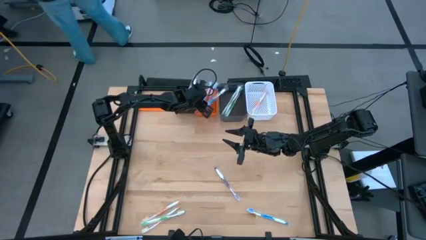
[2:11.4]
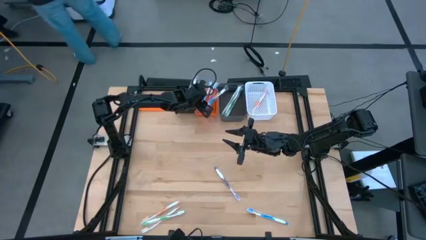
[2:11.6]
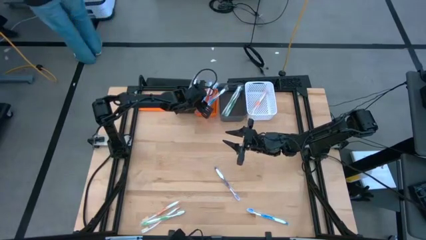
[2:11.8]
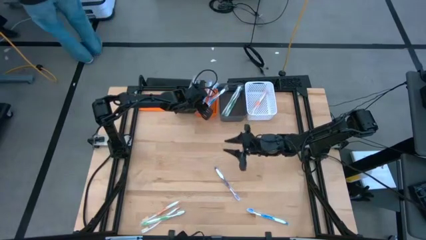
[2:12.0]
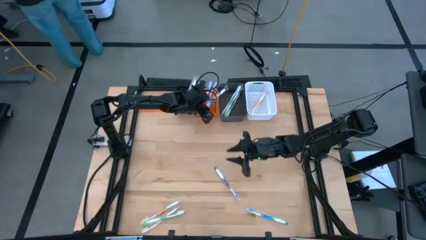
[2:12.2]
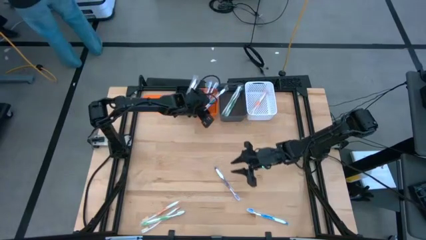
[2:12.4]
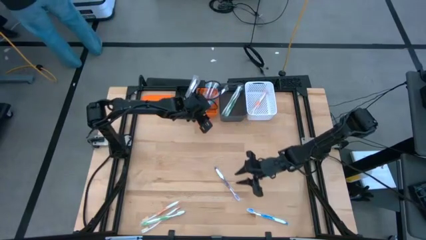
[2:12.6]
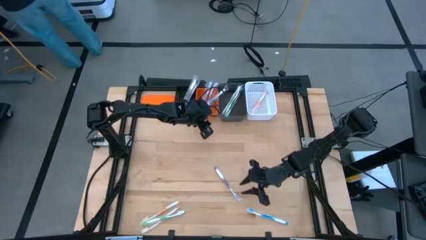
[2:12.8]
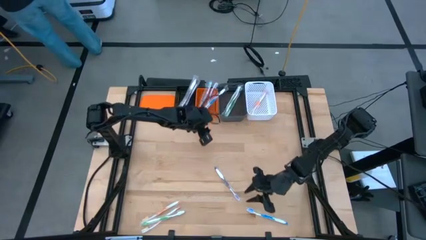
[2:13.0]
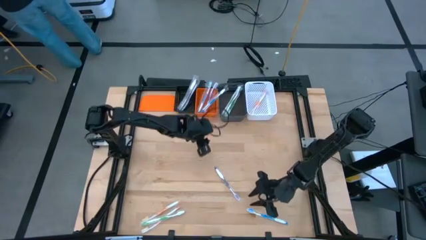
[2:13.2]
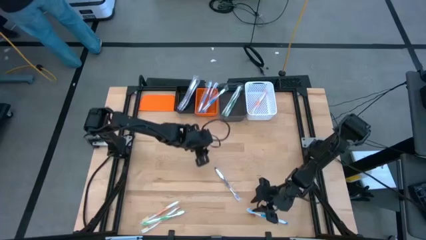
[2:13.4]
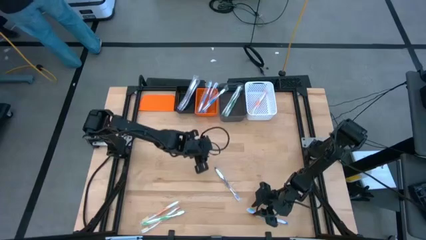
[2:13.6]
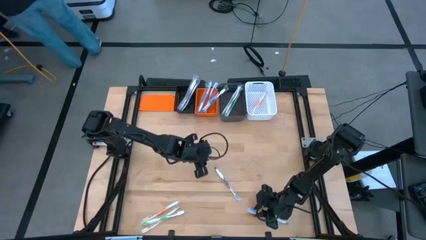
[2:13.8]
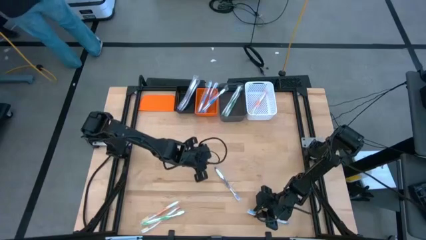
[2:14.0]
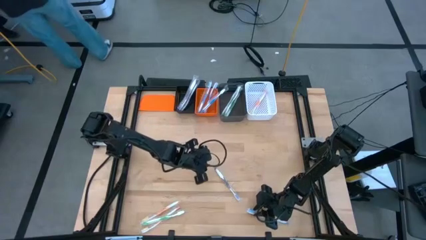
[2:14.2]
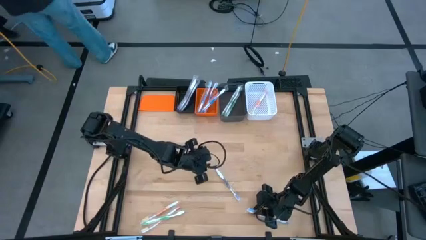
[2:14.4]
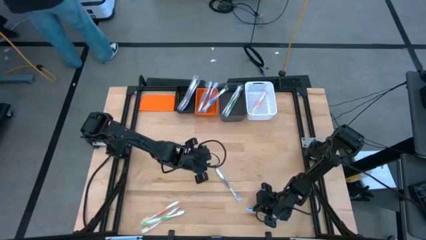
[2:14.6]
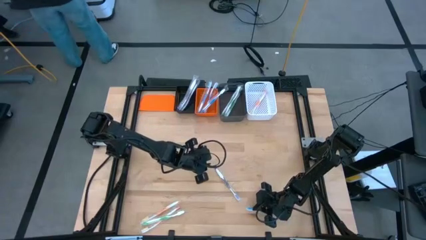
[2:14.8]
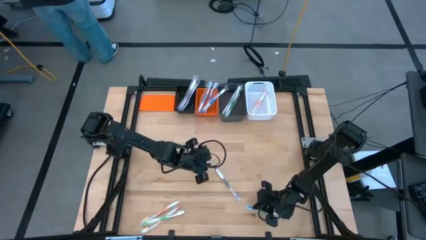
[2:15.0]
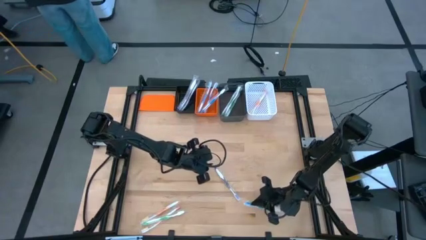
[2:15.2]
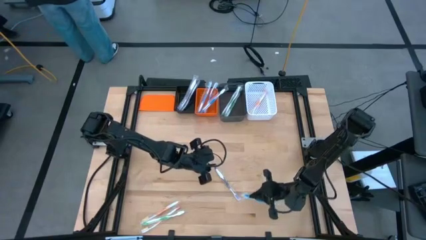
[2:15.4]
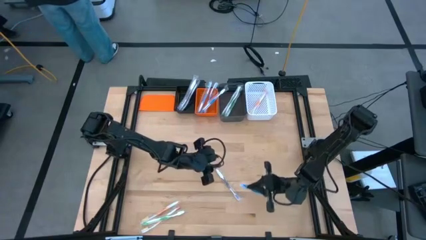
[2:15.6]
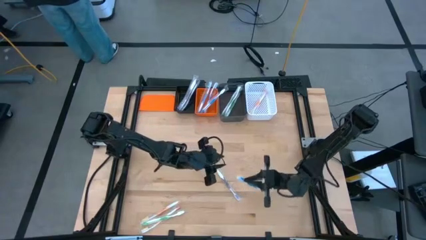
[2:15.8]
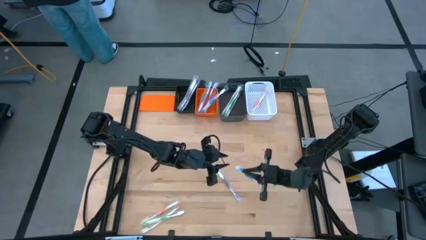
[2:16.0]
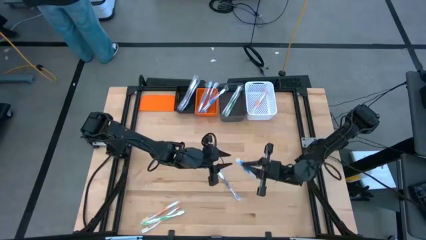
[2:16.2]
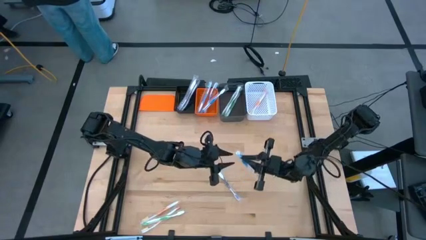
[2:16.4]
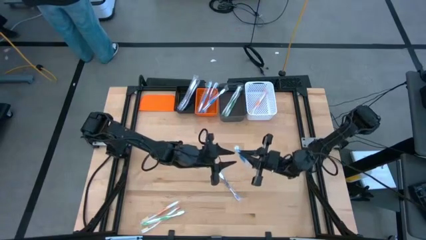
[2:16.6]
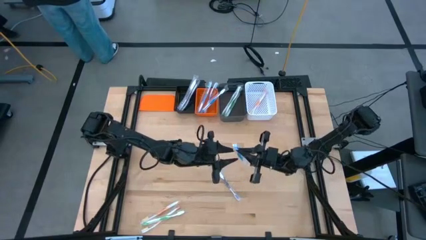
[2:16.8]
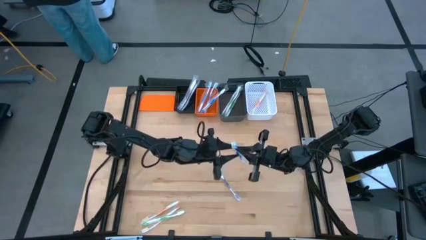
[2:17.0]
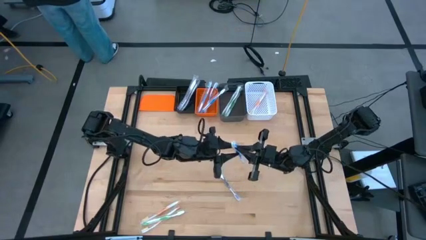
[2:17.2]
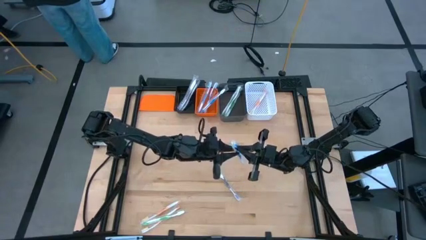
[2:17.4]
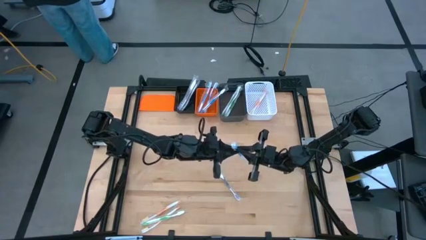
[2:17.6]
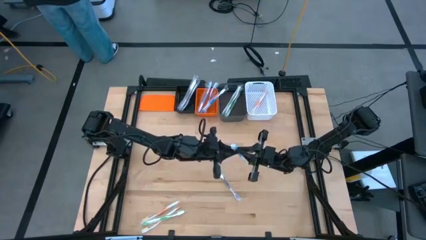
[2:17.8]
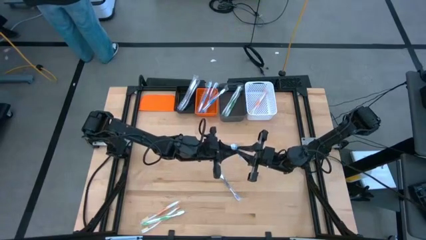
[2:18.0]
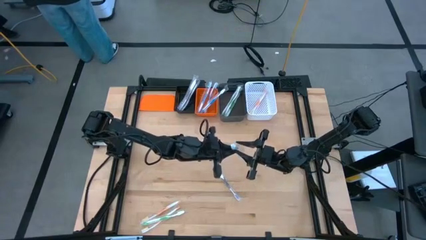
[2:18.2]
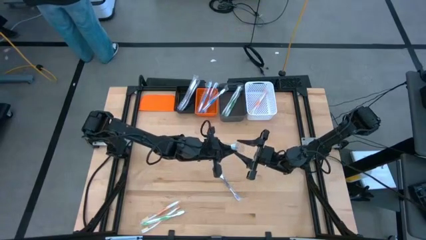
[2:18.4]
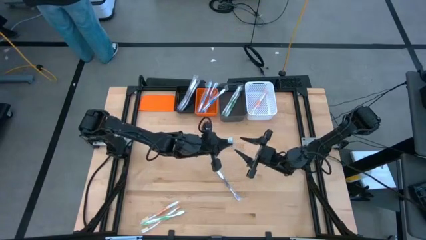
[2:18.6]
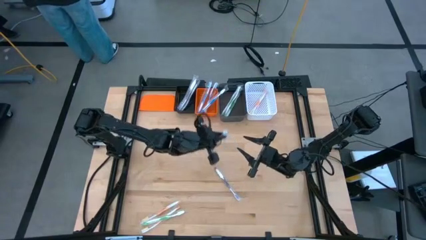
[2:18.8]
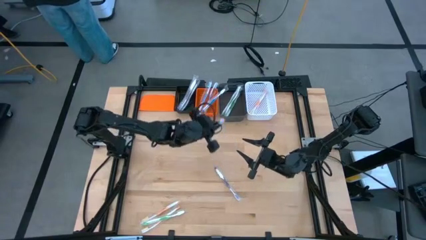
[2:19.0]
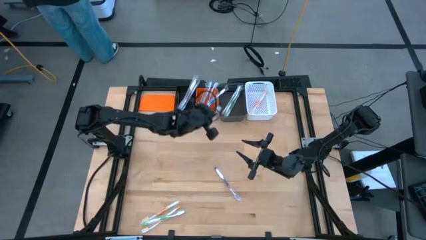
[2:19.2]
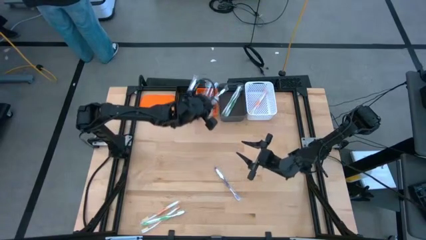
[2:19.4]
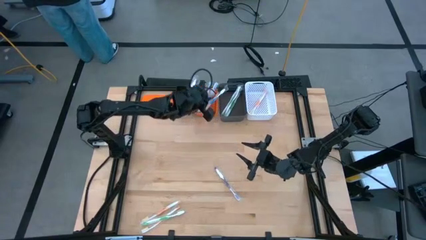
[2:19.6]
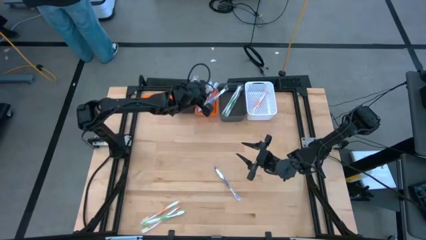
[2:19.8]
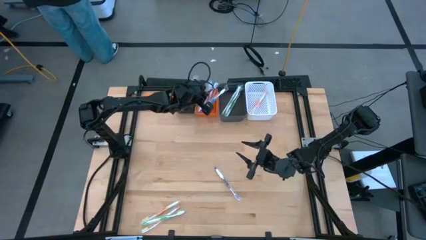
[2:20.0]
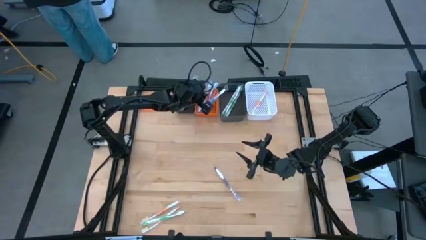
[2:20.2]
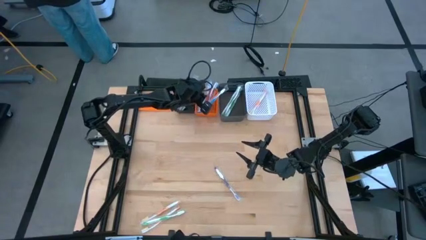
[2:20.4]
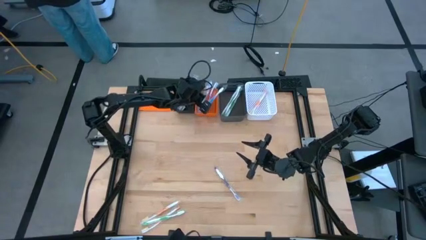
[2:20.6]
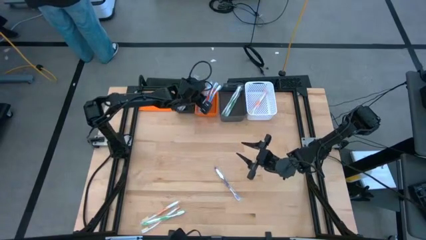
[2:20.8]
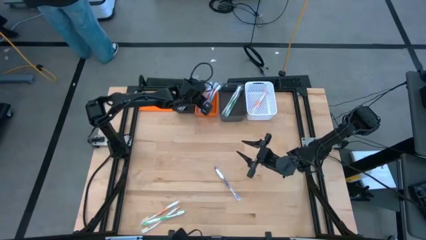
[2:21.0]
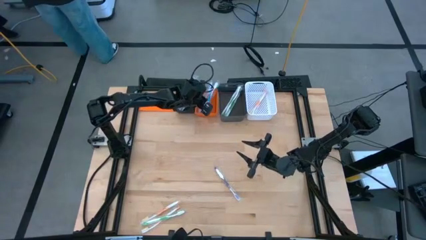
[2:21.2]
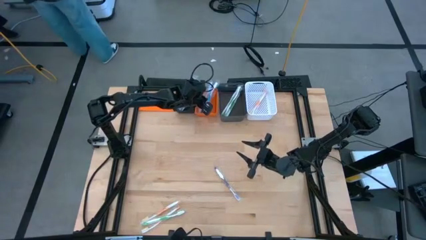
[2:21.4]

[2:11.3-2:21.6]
Task: Pick & Place Toothbrushes
Put the blue toothbrush into the orange bin

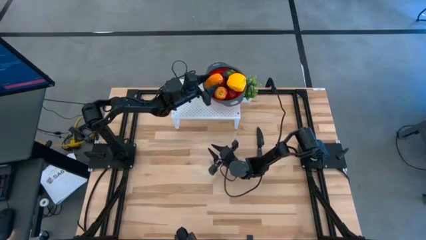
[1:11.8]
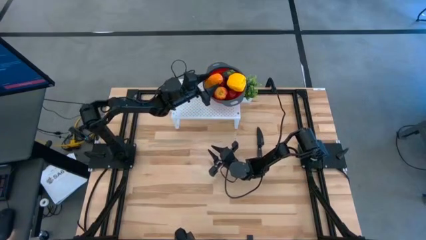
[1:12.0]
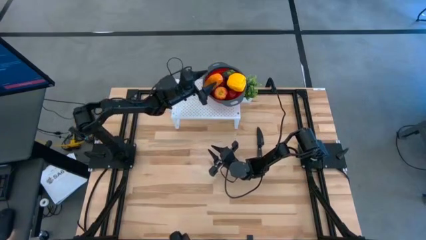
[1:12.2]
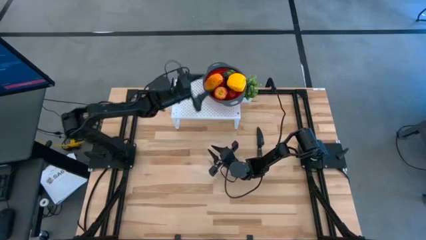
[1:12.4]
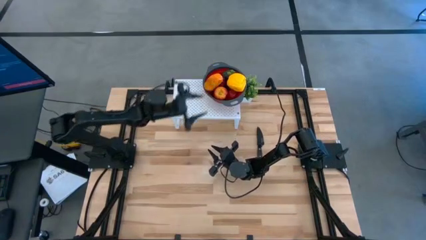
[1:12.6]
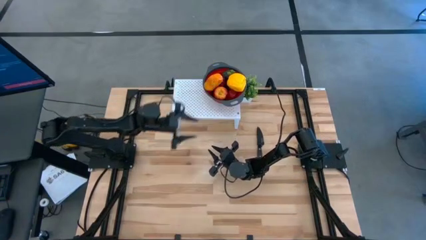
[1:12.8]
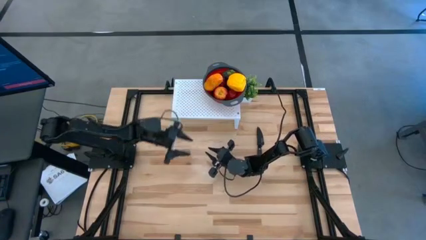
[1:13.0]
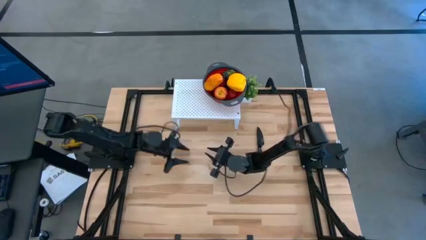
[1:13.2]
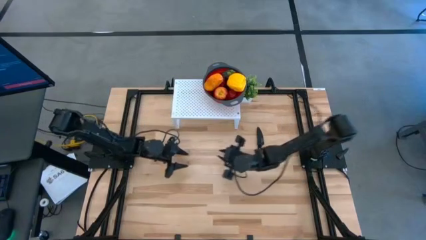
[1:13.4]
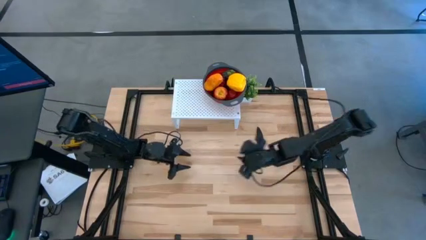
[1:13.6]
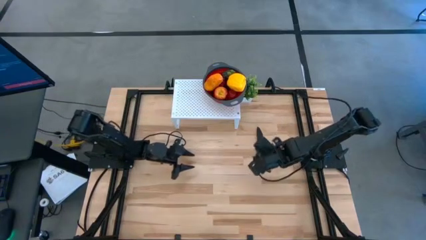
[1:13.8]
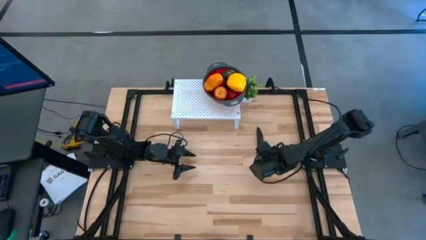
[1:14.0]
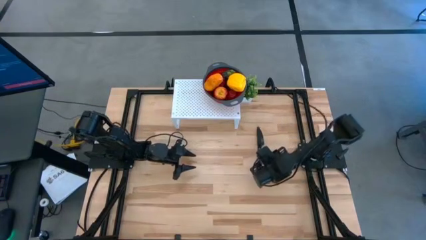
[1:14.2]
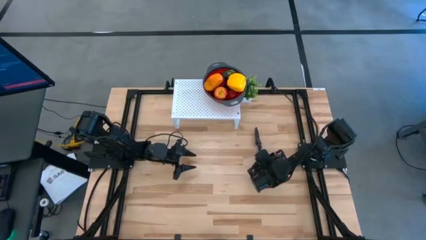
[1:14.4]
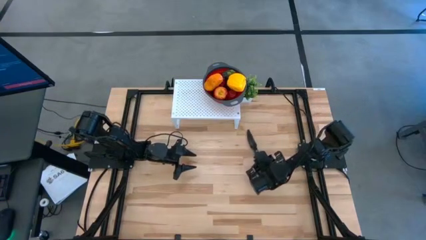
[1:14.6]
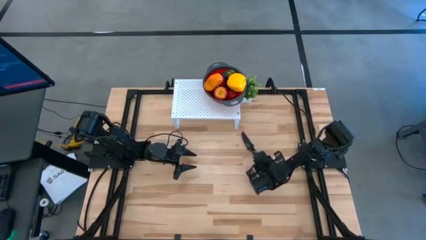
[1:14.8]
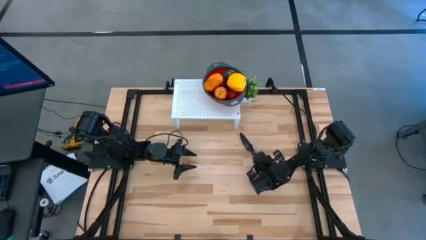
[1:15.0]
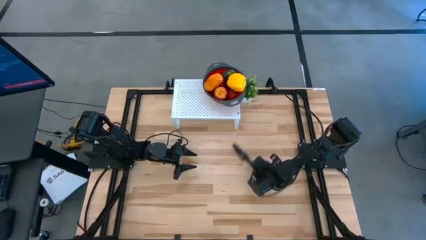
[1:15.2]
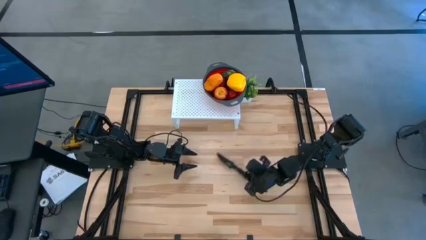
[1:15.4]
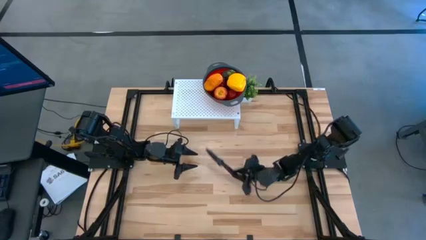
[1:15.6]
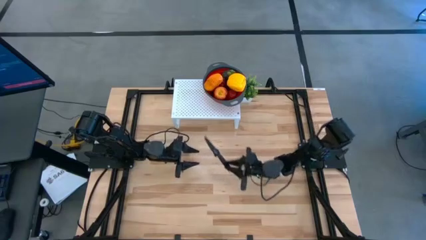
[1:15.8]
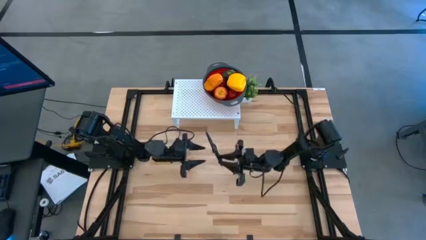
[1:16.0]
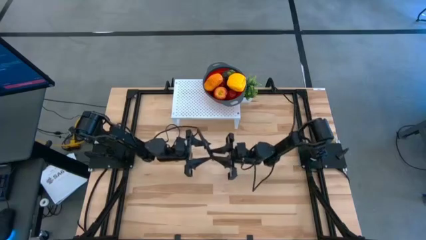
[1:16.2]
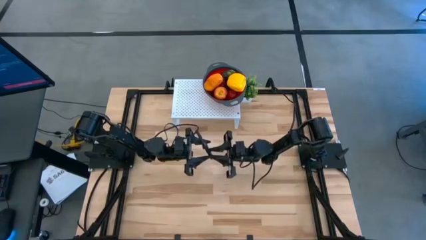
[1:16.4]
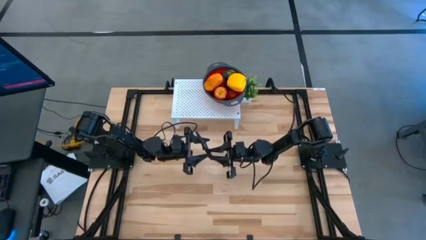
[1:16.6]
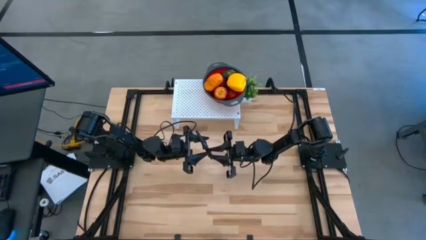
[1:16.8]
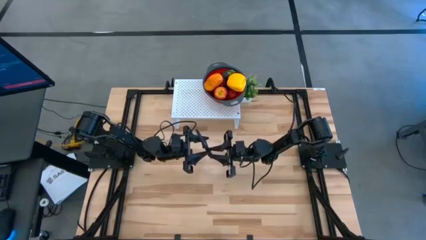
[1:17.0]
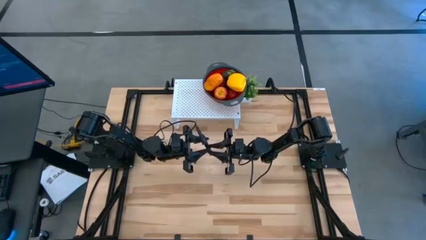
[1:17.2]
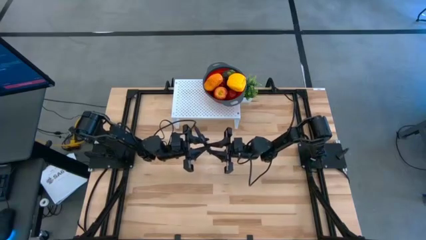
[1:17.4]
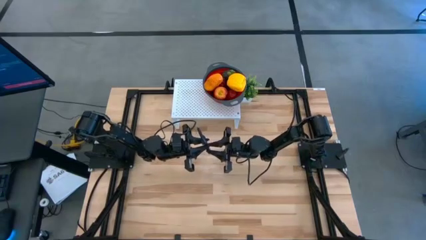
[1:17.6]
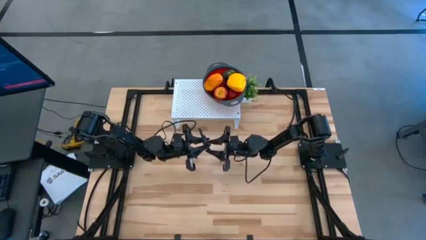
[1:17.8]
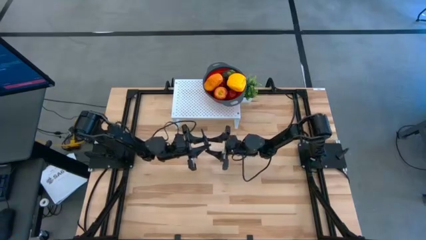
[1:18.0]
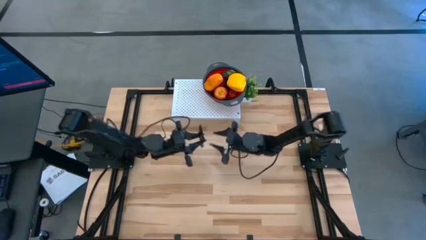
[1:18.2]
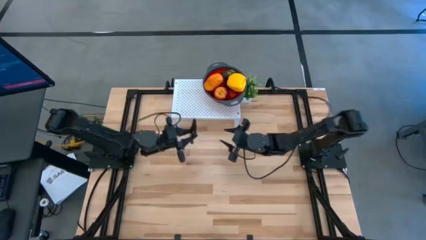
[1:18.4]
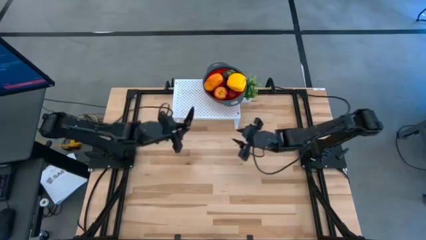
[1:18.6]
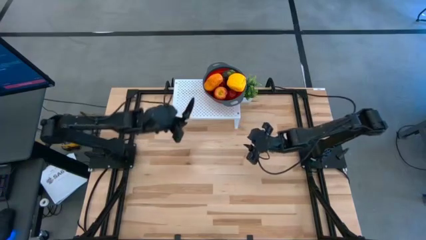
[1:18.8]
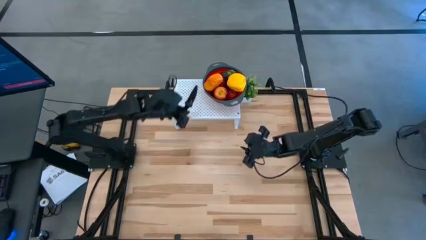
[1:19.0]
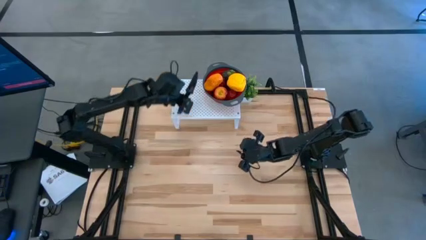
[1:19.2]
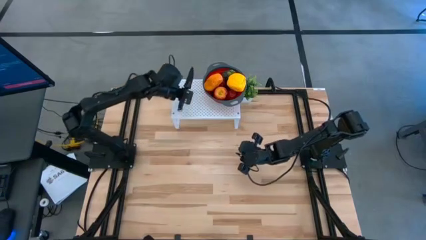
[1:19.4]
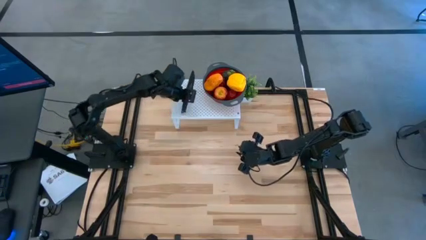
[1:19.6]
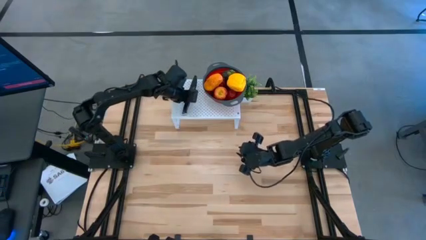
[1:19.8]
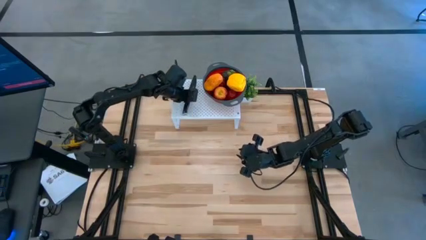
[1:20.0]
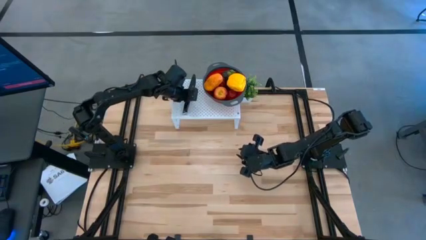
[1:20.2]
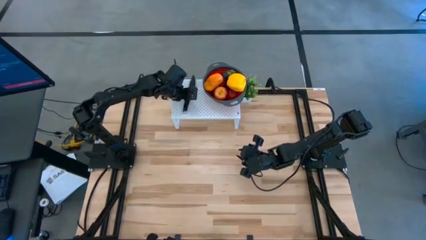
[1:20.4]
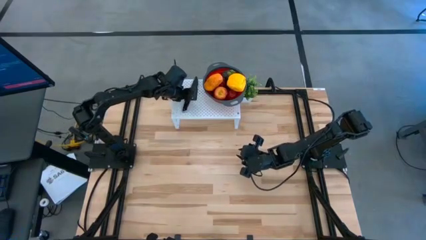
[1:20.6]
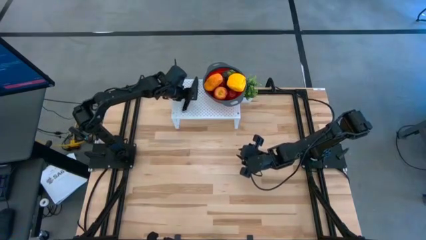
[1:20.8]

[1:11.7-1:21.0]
Task: Pick & Place Fruit
Put the black knife on the shelf
